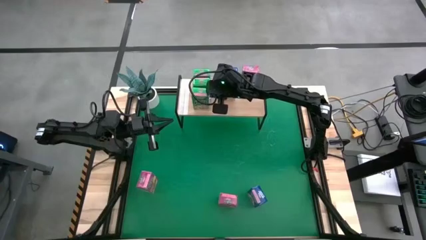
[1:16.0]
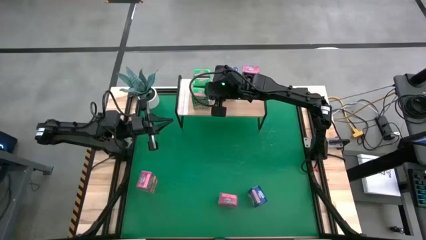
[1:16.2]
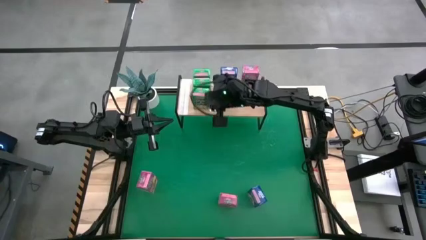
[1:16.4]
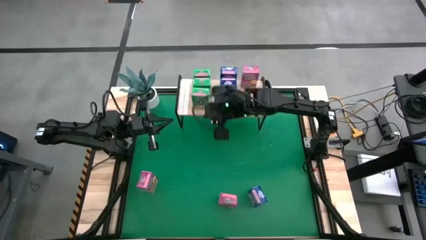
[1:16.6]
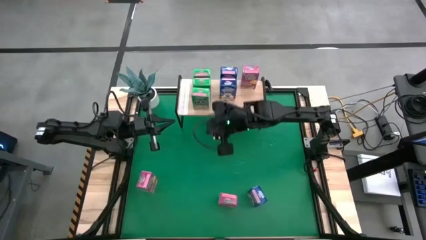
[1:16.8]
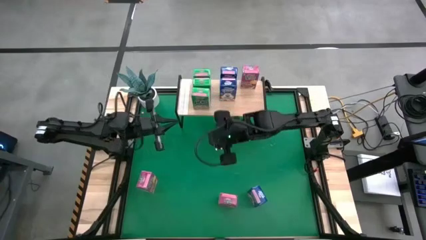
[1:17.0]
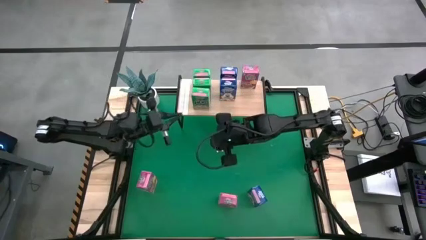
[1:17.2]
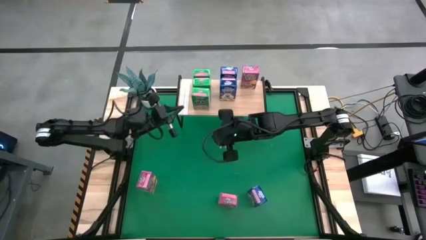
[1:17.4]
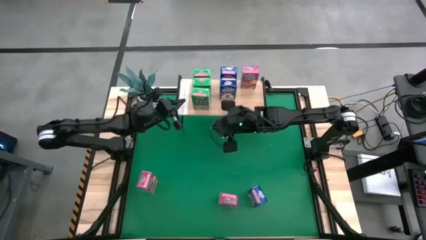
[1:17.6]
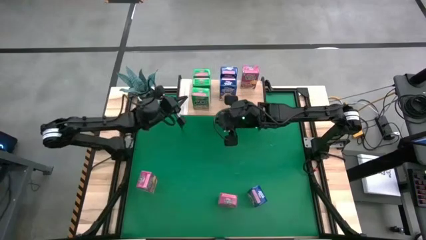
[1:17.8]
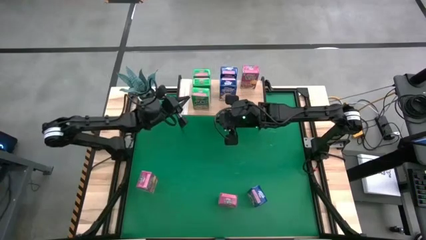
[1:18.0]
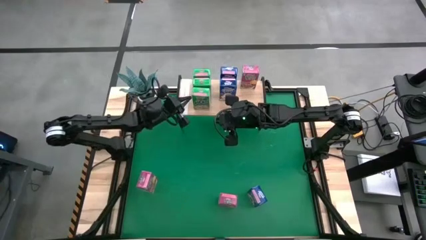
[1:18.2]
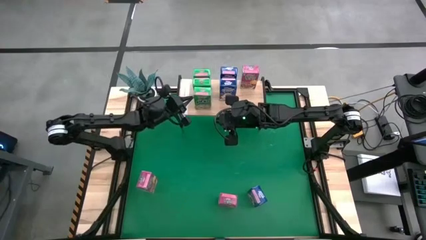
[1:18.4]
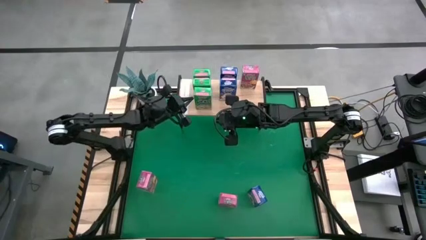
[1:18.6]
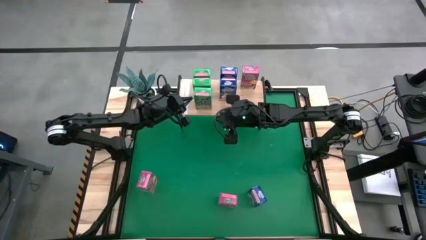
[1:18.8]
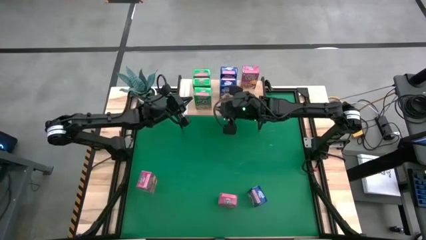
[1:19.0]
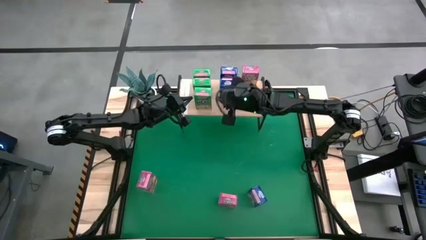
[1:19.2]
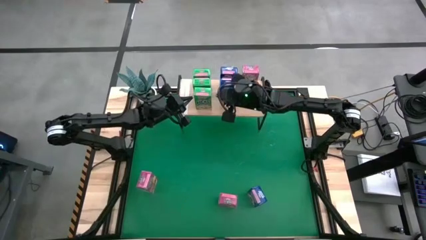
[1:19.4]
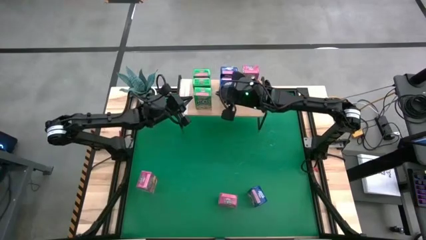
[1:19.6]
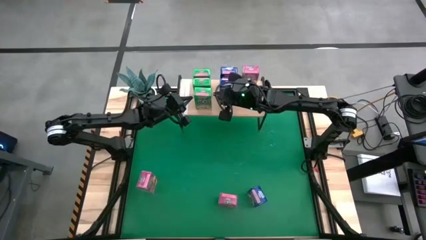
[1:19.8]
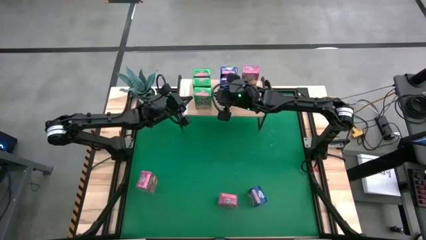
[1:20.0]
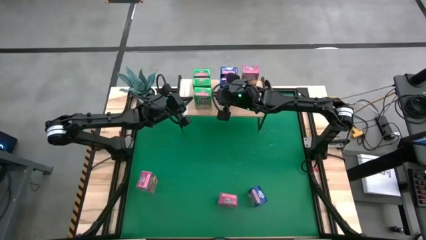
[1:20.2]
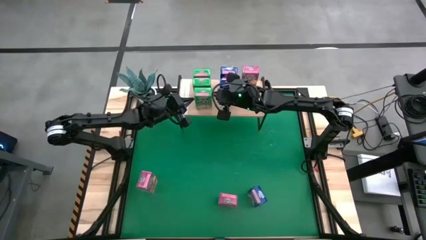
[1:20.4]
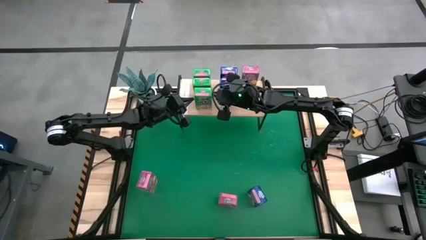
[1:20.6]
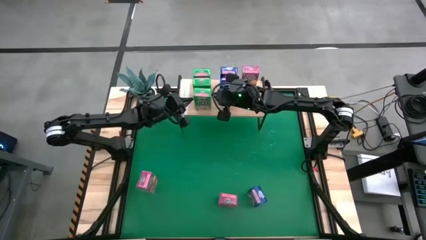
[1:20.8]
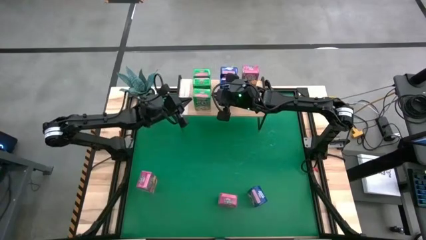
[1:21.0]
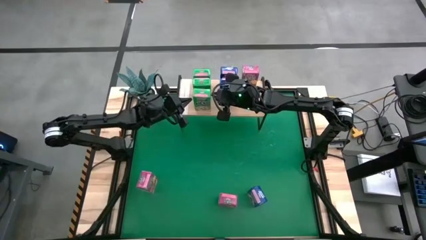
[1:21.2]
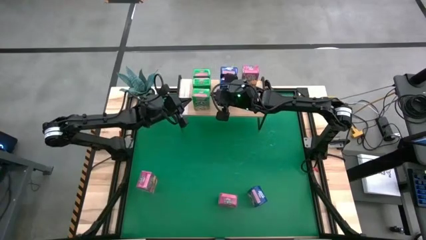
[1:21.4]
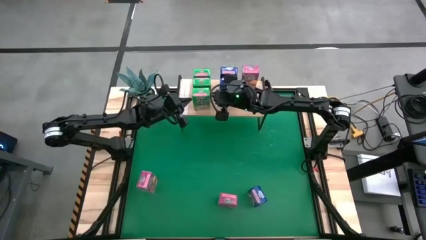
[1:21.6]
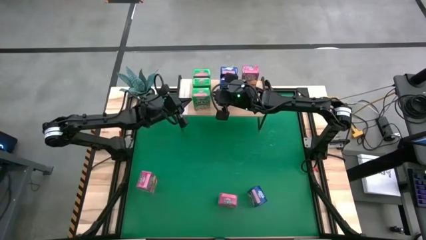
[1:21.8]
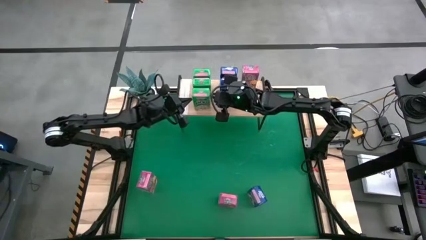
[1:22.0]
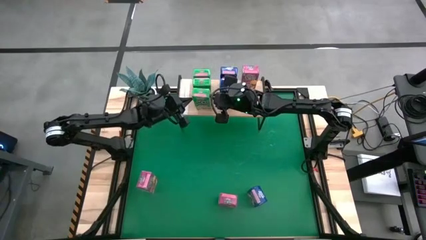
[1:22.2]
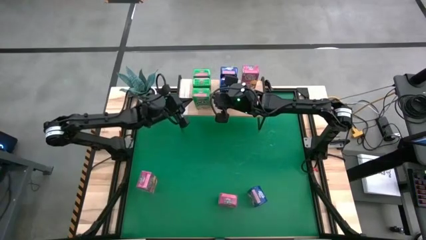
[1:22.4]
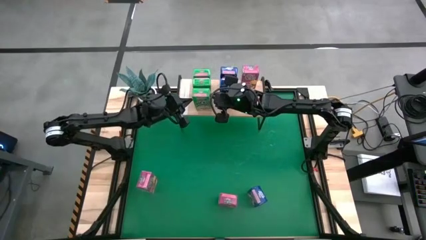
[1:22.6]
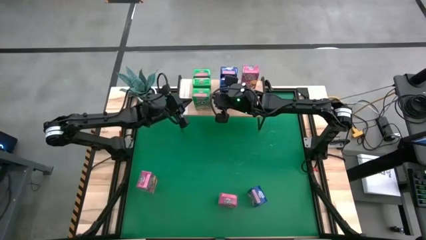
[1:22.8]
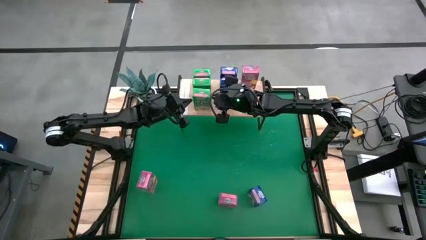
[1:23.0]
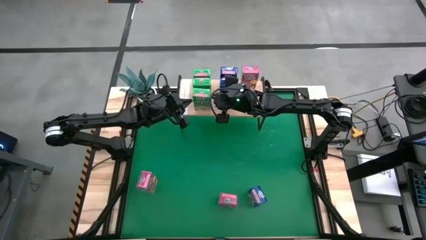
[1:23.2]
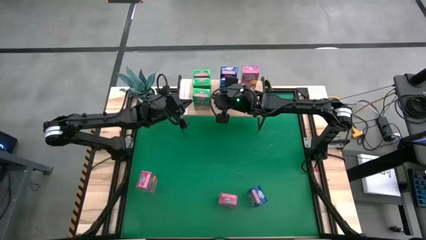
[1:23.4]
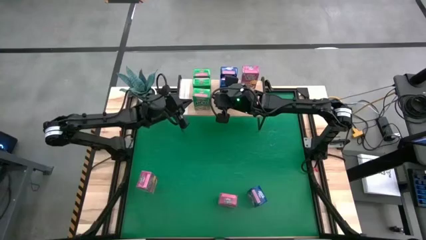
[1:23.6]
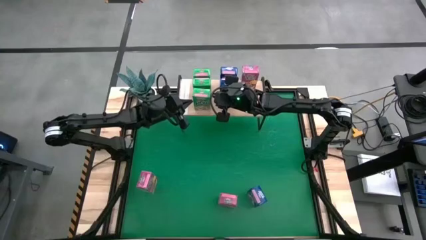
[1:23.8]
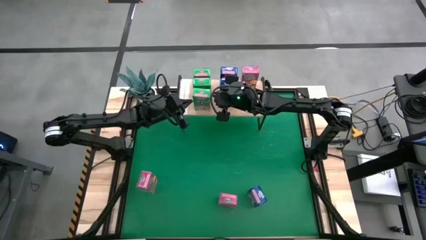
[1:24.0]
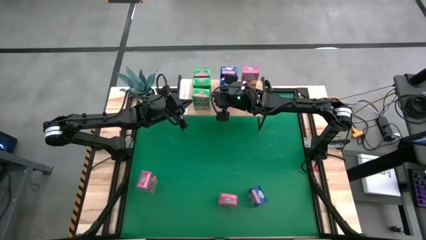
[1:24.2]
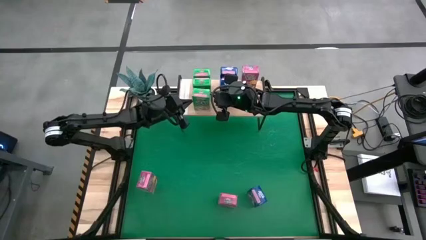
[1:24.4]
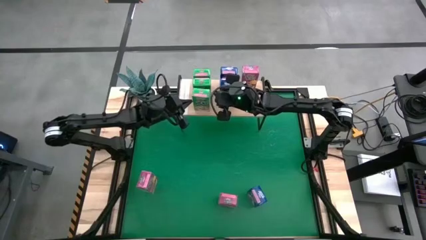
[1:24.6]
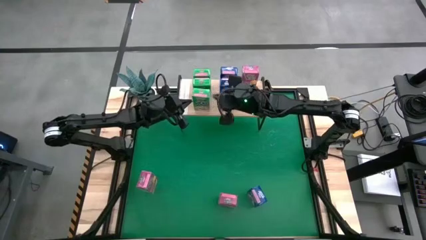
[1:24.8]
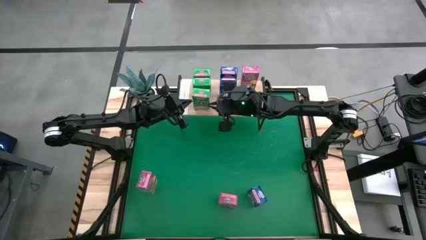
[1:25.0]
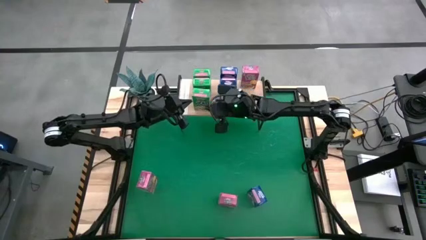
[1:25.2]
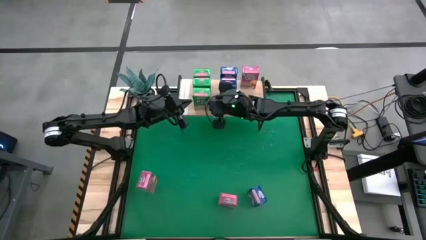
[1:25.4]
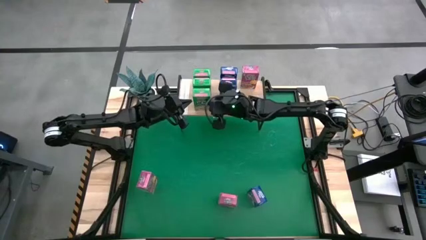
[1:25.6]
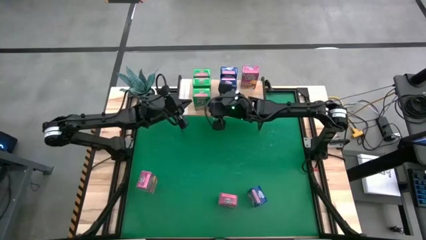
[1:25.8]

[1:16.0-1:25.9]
Task: Stack cereal on shelf
Put the green cereal box on the shelf aligned with the other green cereal boxes

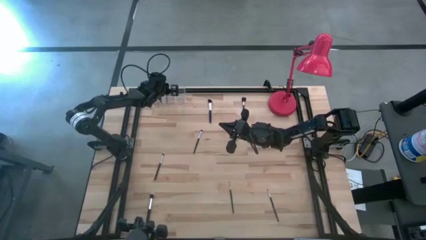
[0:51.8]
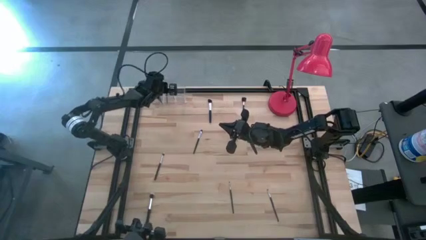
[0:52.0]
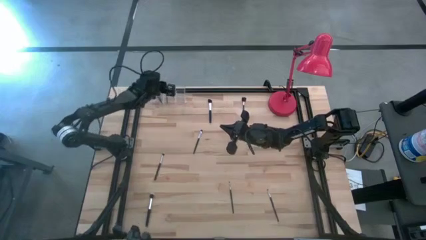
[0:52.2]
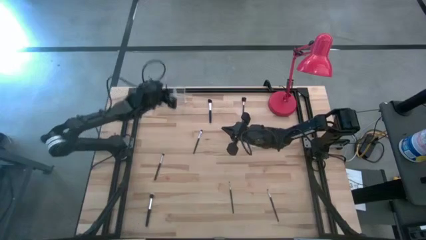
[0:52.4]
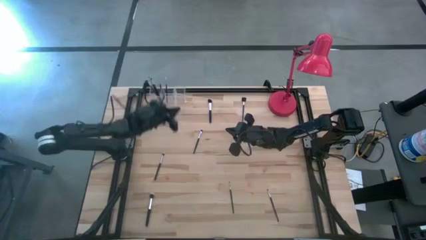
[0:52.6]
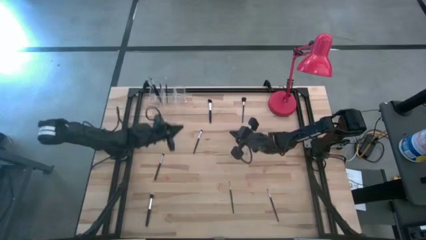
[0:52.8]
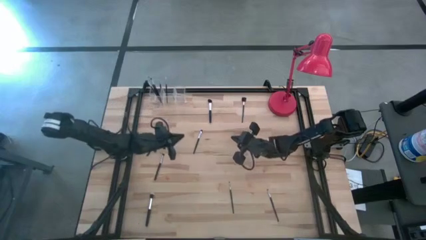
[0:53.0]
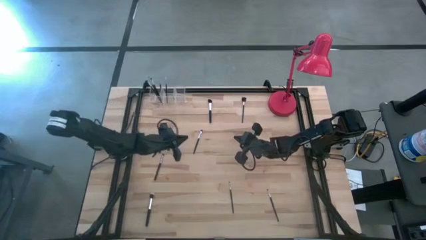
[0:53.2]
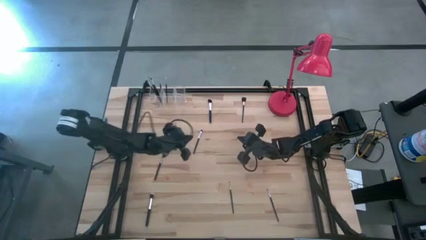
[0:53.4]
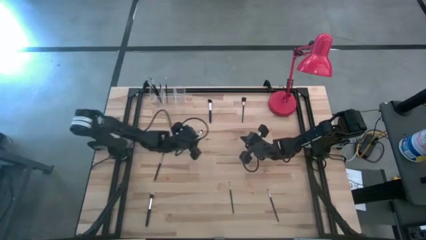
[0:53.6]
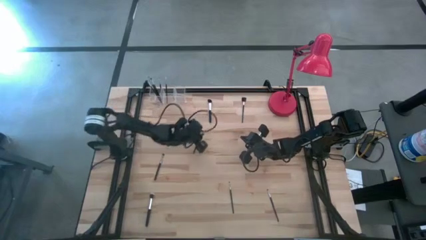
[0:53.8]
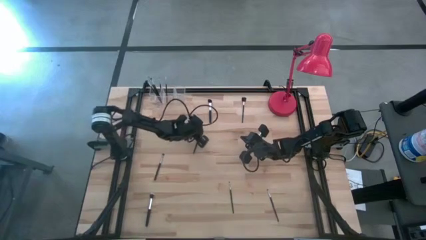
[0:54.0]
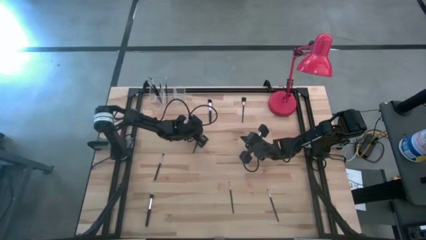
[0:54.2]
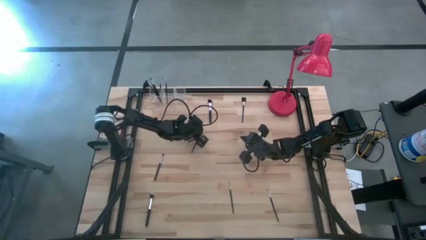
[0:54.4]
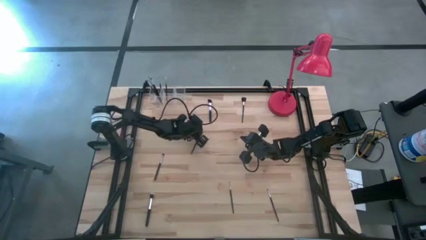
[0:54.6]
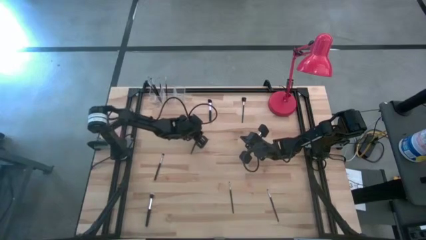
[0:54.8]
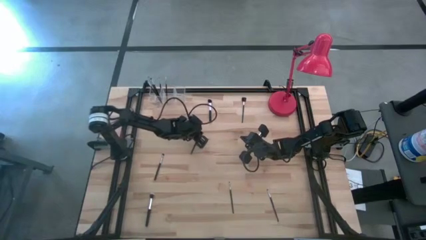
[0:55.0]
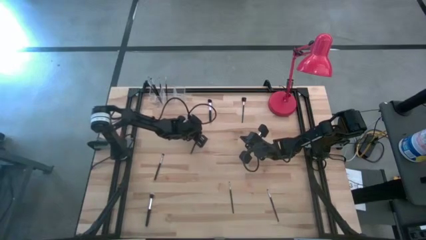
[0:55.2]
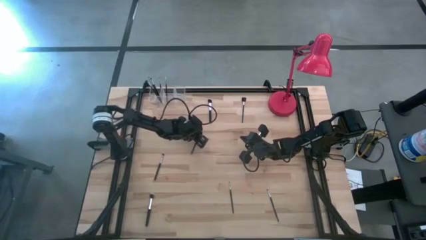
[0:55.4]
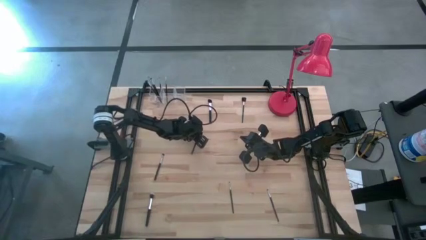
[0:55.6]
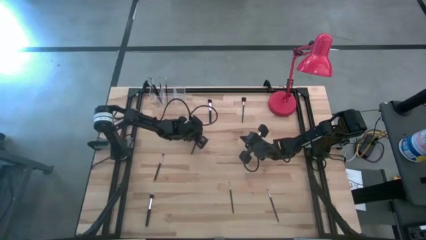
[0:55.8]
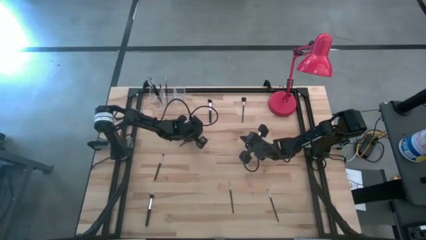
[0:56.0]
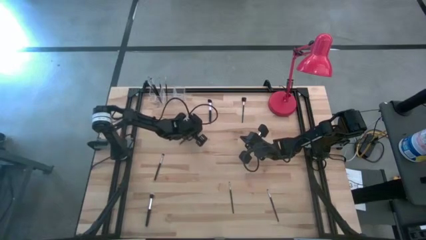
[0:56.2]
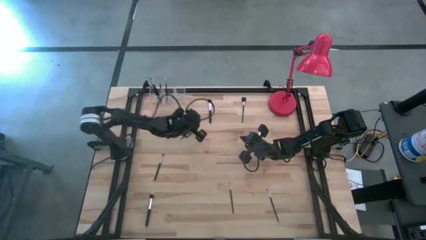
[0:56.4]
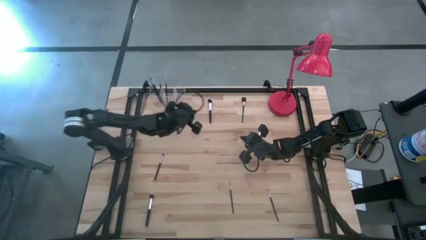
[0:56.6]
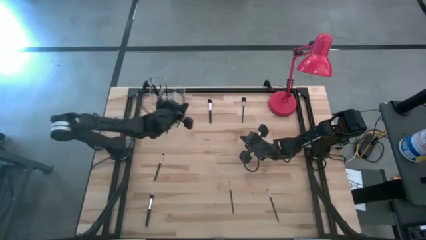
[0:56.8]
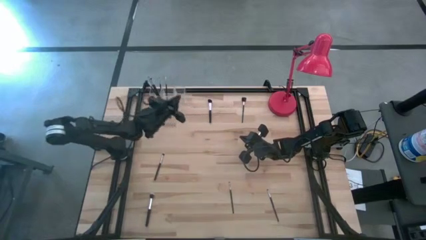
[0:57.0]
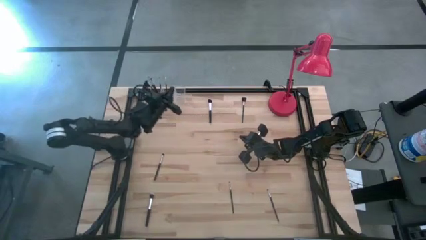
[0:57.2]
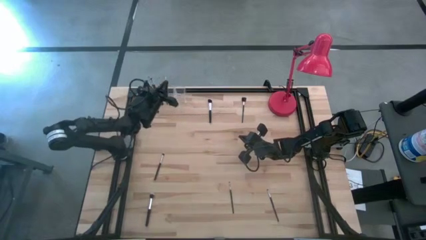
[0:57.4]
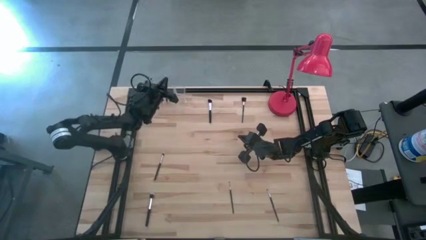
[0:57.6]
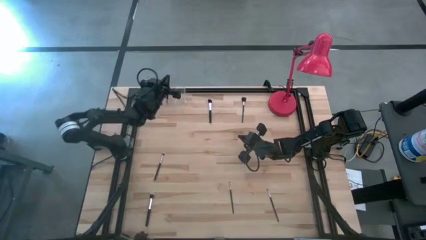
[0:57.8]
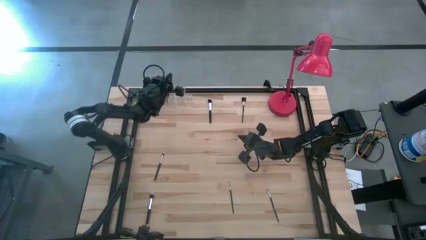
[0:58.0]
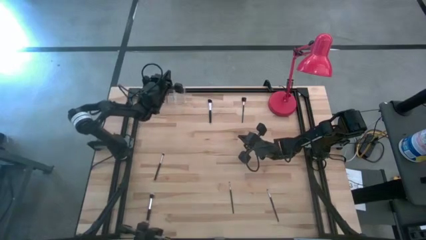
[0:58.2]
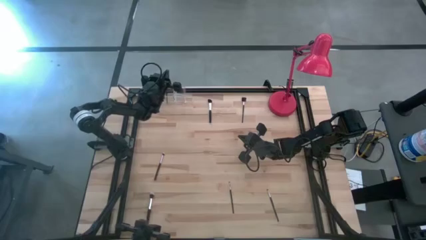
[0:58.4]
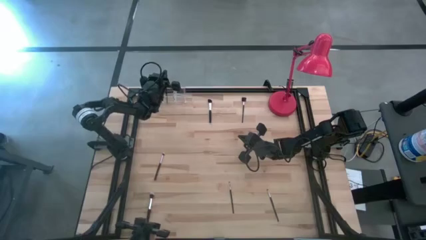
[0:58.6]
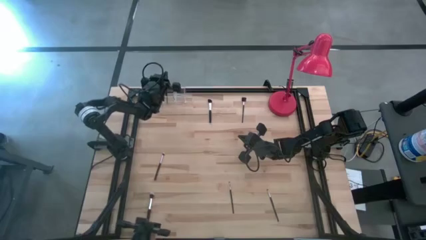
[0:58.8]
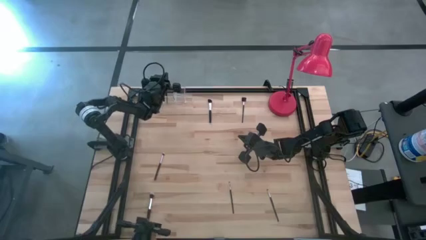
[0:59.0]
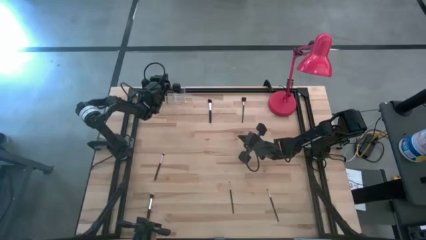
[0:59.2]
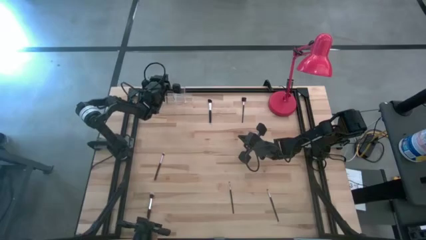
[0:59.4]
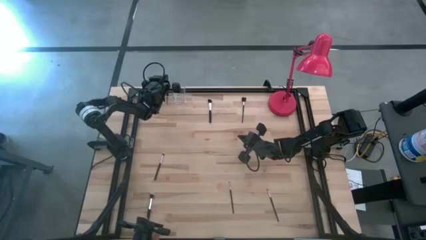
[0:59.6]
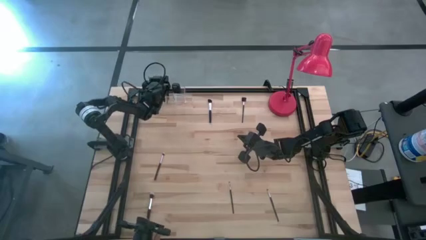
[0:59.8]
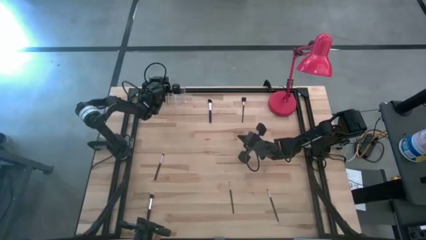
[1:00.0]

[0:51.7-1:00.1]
Task: Pick & Place Makeup Brushes
Put the eyeshadow brush into the transparent organizer
